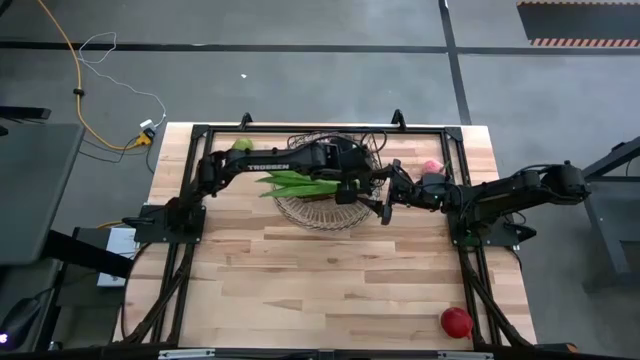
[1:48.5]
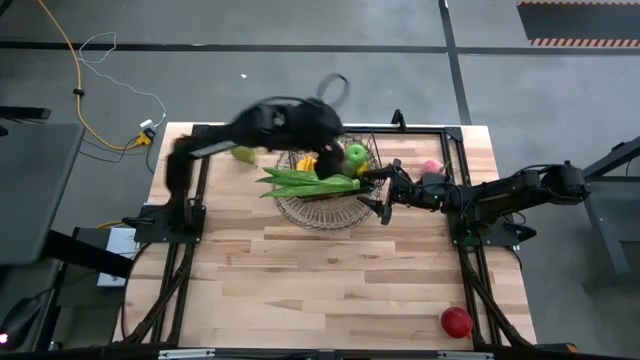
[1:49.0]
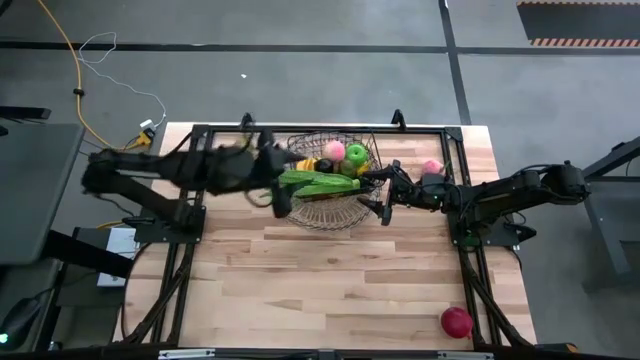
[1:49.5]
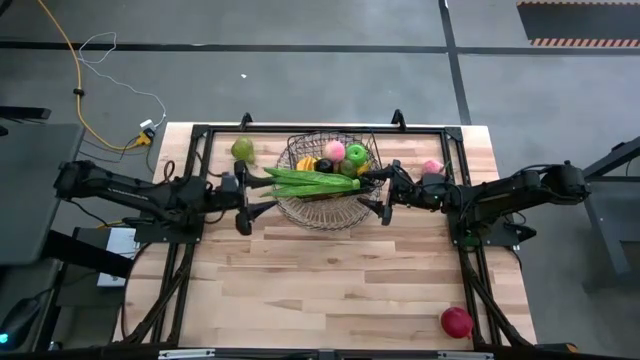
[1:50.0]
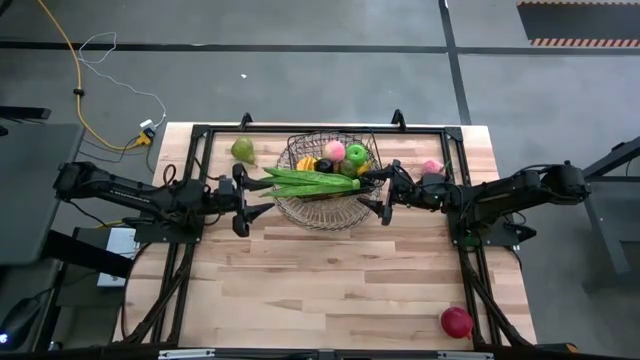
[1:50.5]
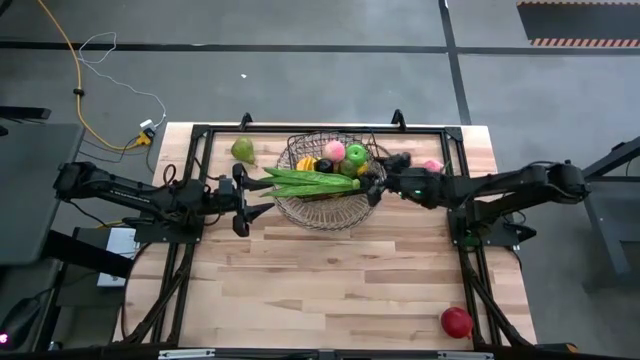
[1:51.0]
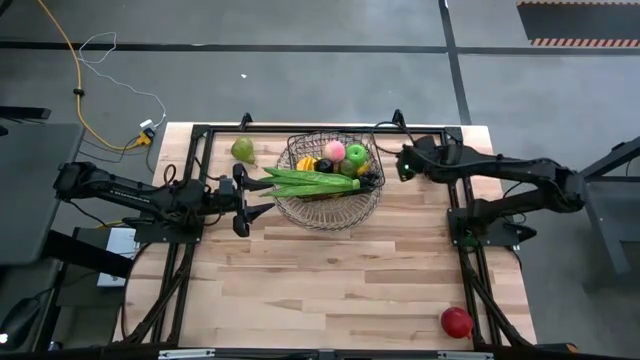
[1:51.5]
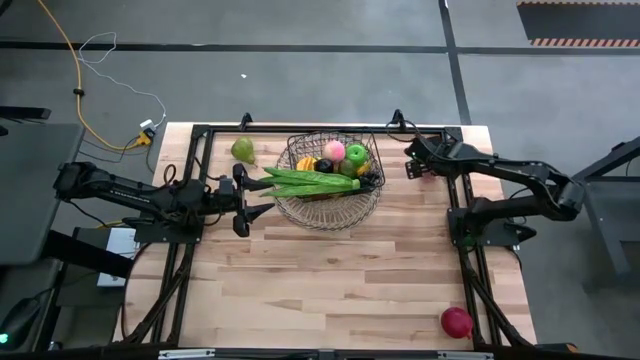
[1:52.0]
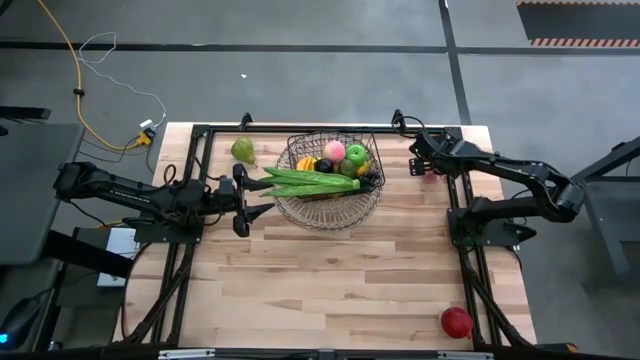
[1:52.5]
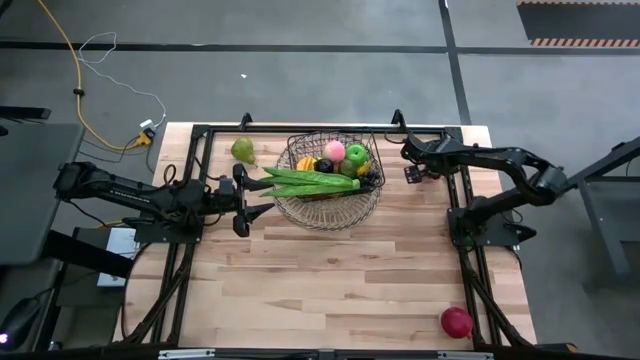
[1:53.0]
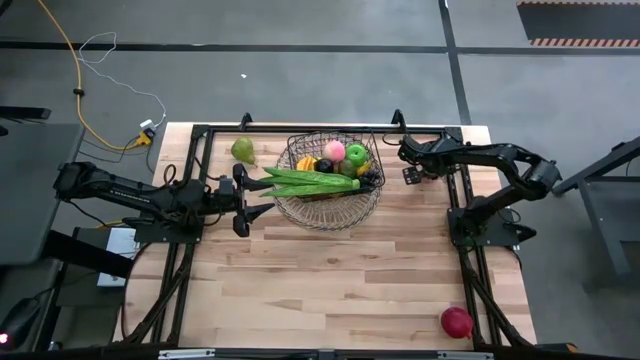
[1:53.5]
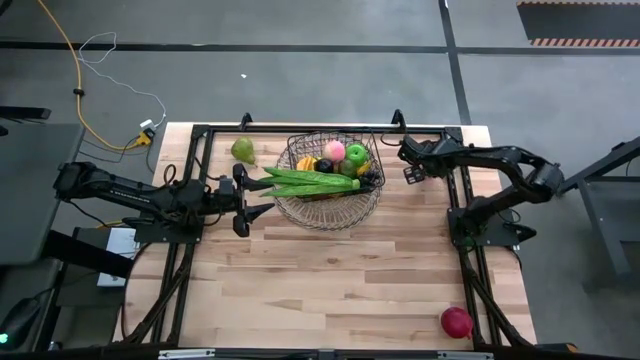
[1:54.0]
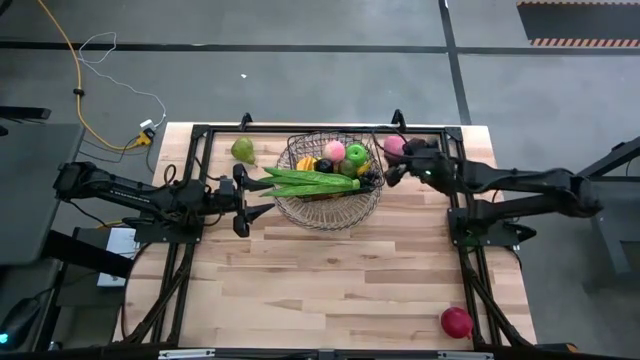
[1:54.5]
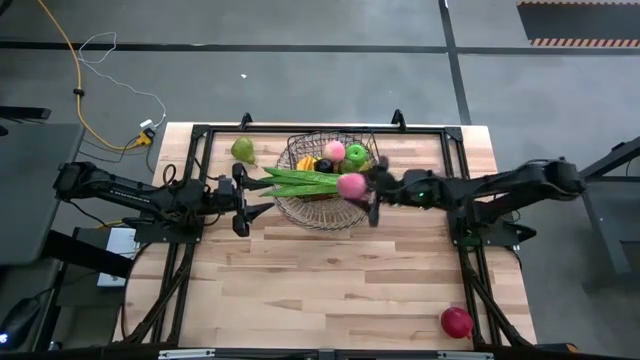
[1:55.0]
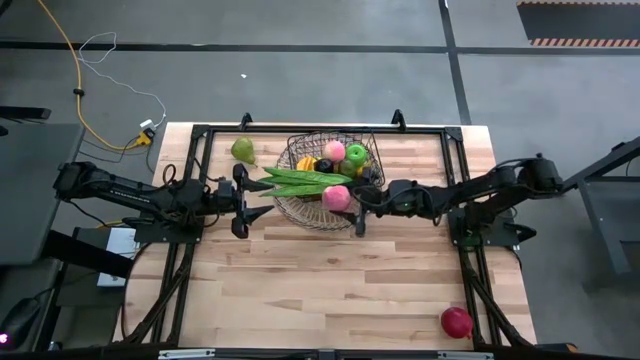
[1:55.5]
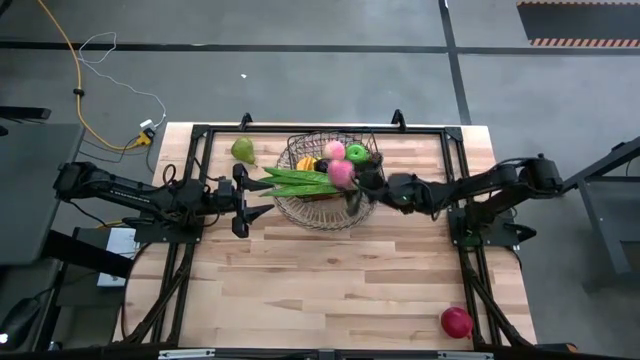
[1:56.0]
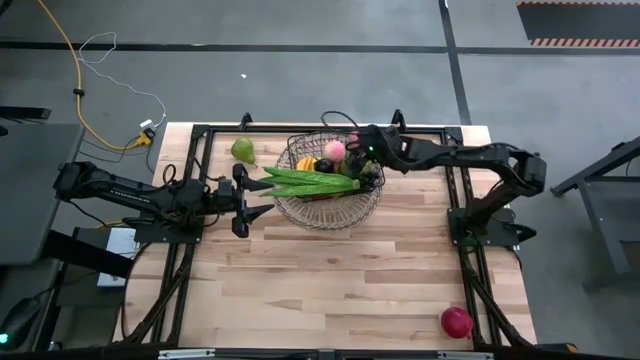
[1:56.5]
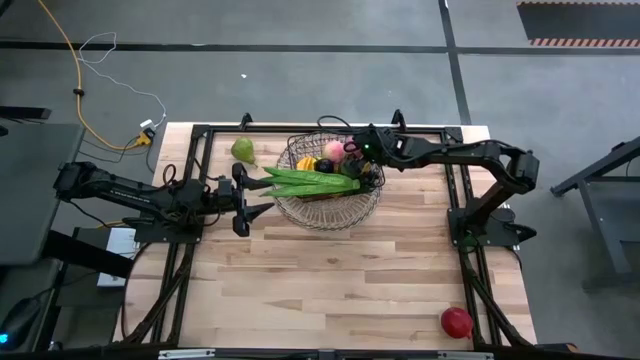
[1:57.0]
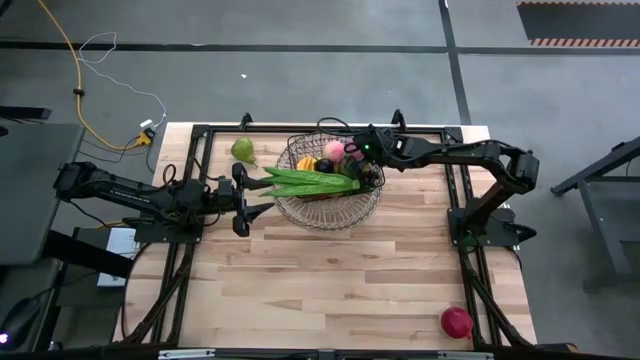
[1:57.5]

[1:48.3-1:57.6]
Task: Build produce basket
Put the peach into the wire basket

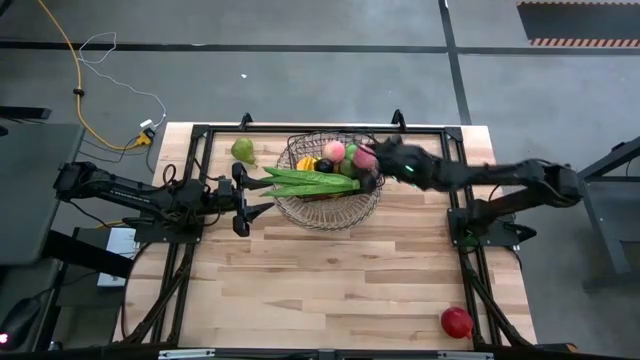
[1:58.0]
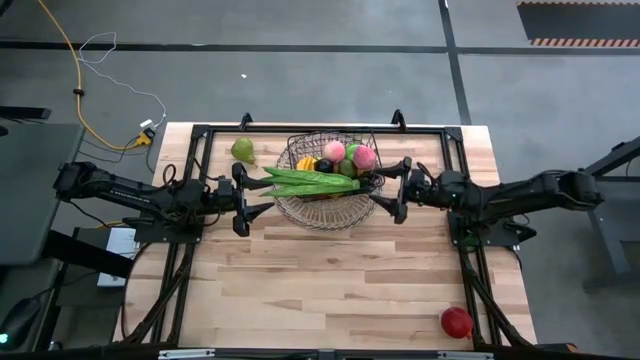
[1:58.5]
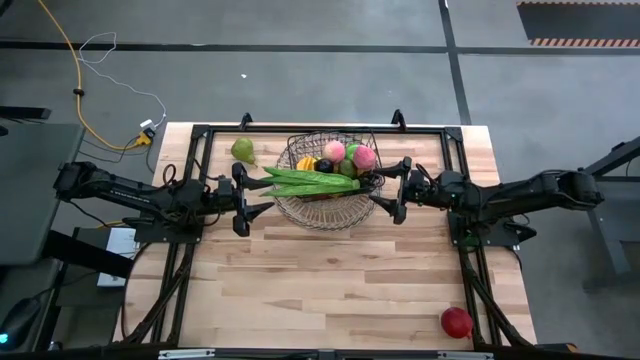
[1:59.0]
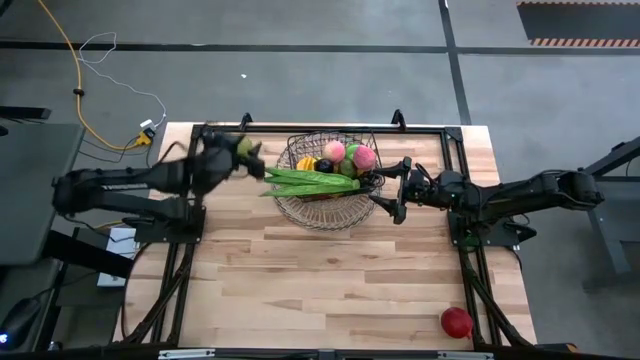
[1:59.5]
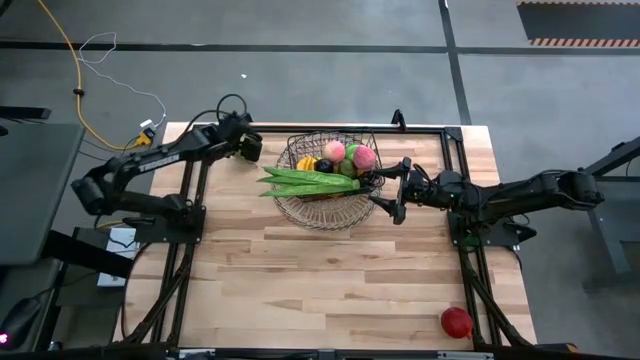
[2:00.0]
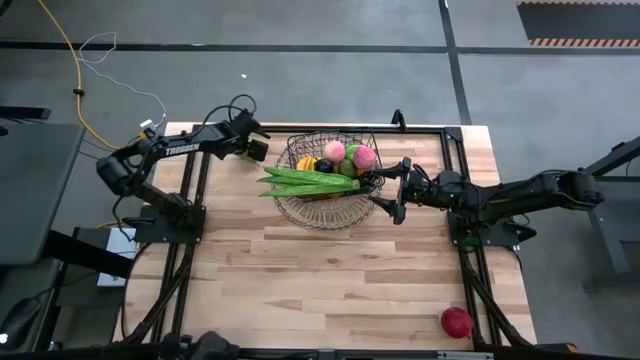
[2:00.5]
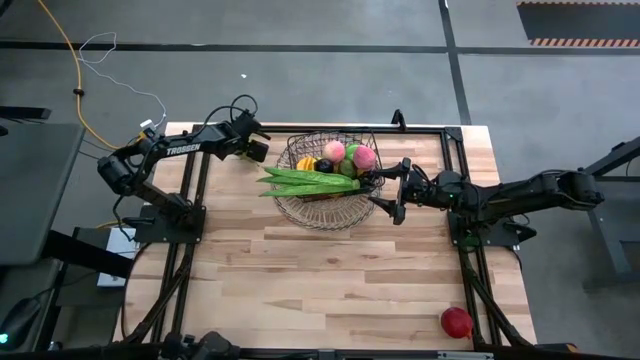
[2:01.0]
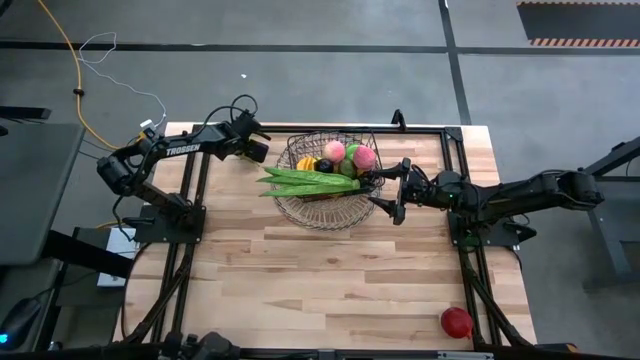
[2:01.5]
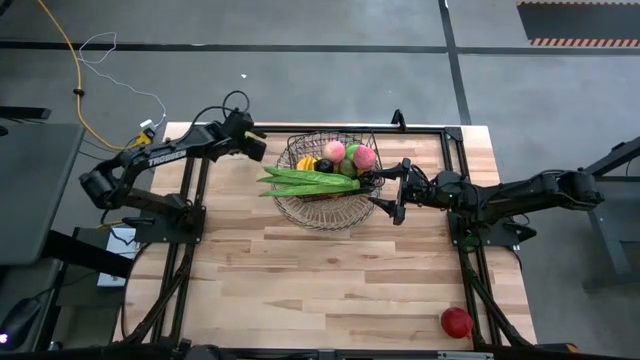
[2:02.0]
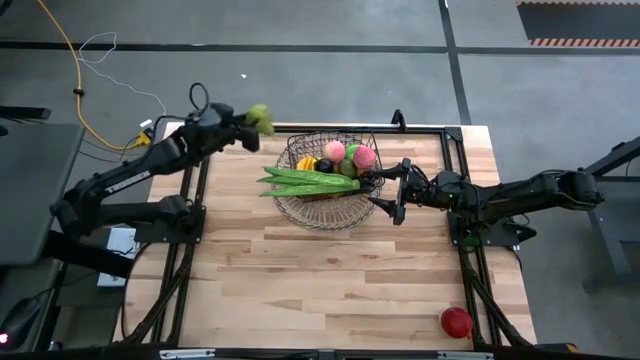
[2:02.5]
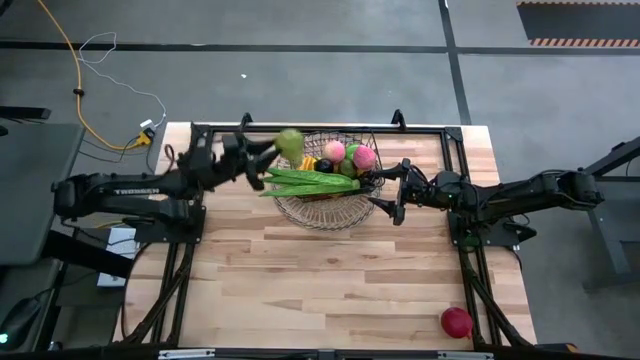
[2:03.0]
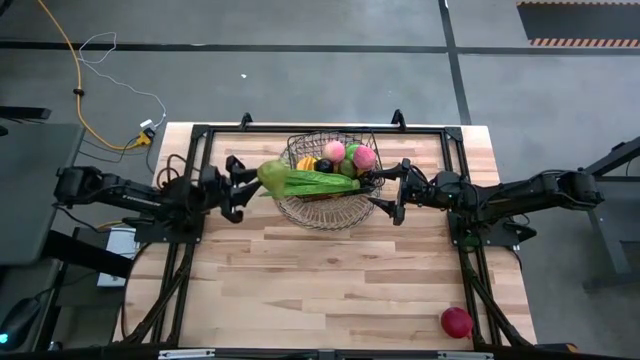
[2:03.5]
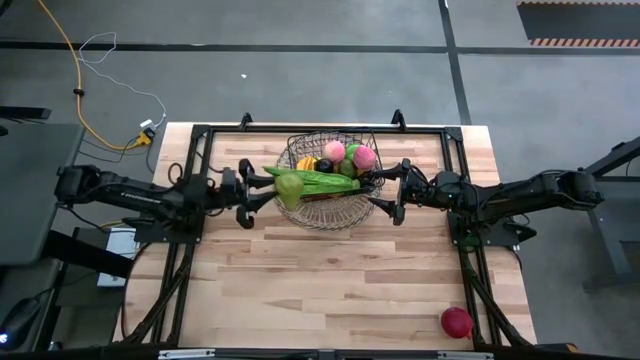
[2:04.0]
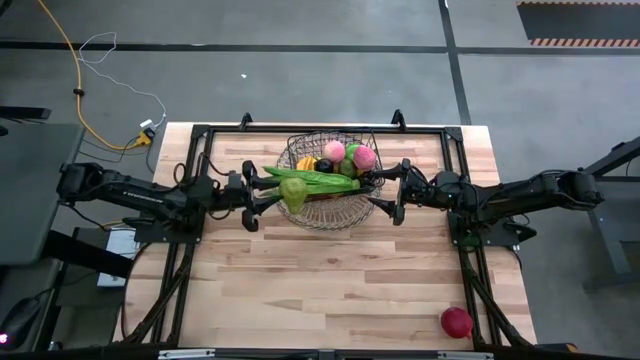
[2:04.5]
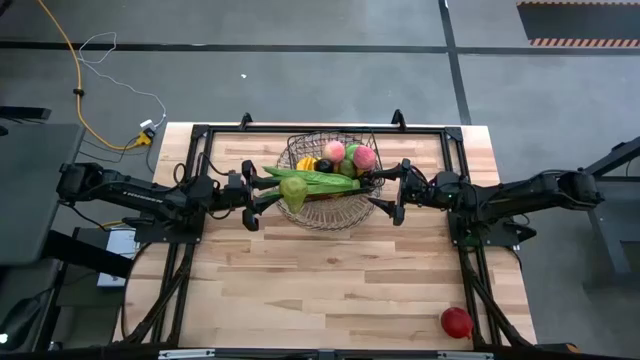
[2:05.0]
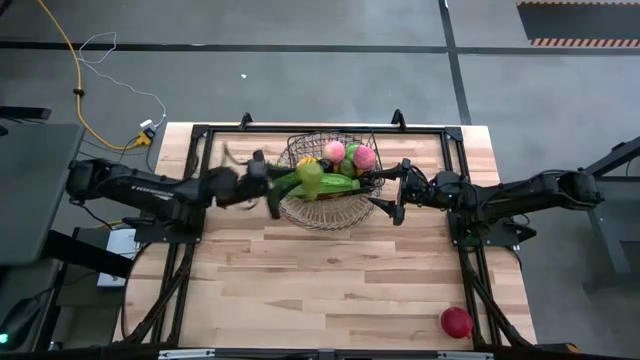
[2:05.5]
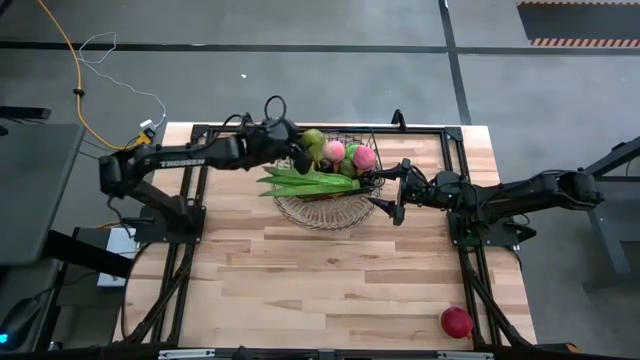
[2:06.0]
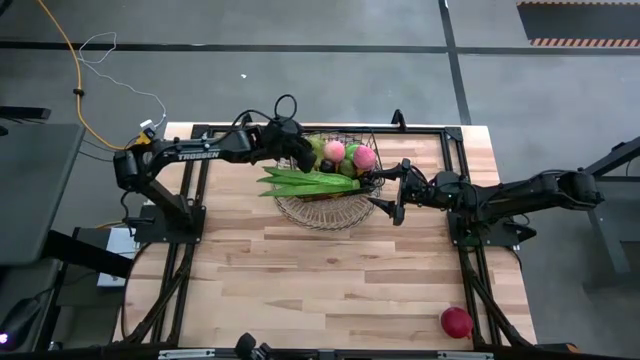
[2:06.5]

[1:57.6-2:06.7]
Put the pear into the wire basket

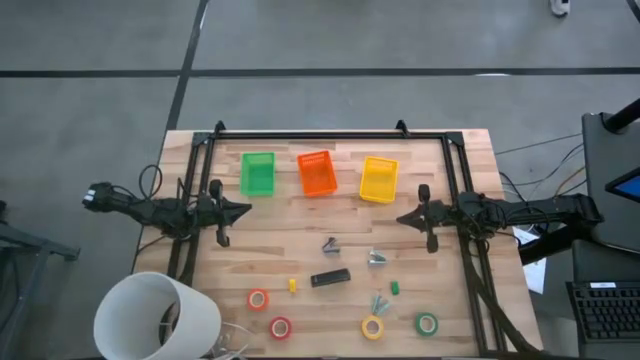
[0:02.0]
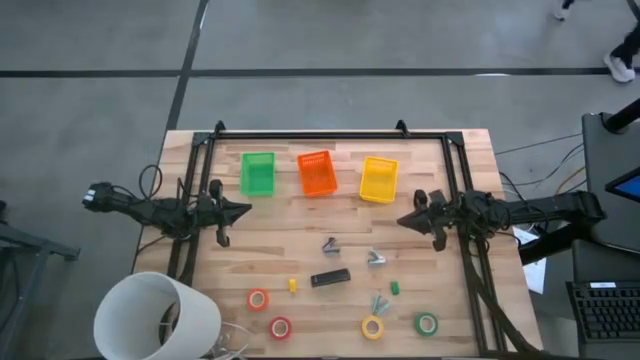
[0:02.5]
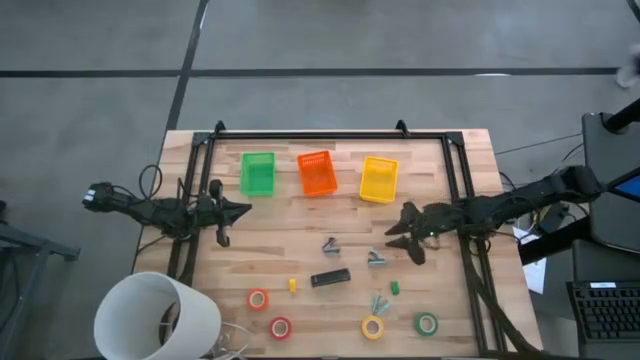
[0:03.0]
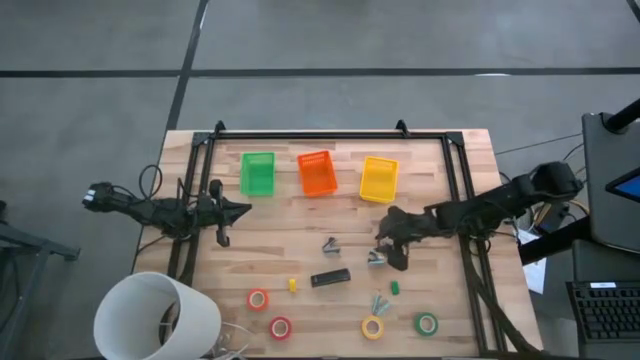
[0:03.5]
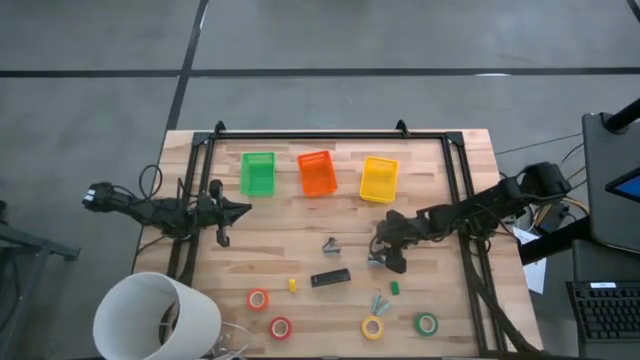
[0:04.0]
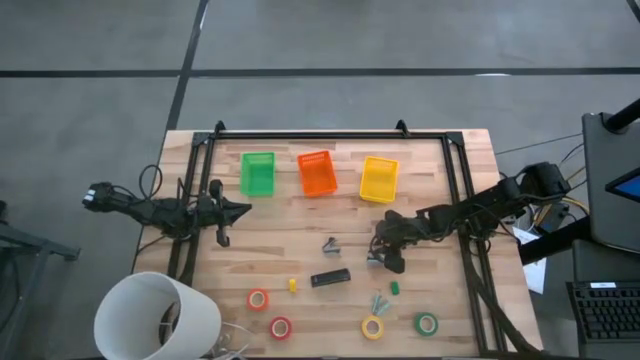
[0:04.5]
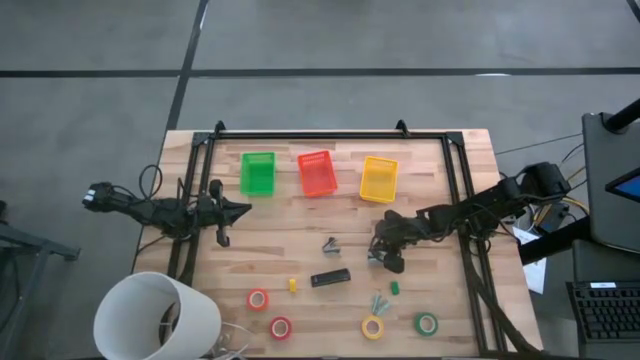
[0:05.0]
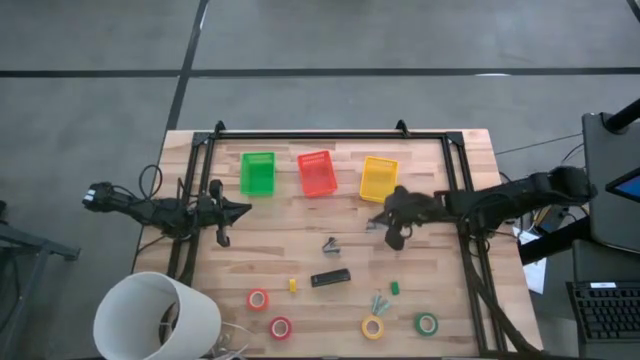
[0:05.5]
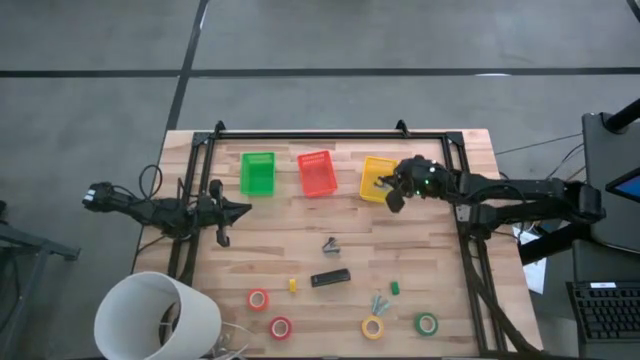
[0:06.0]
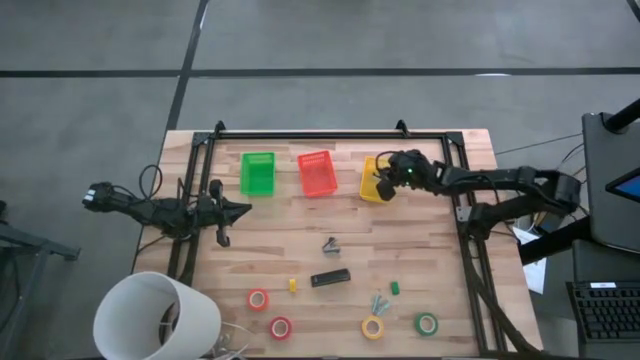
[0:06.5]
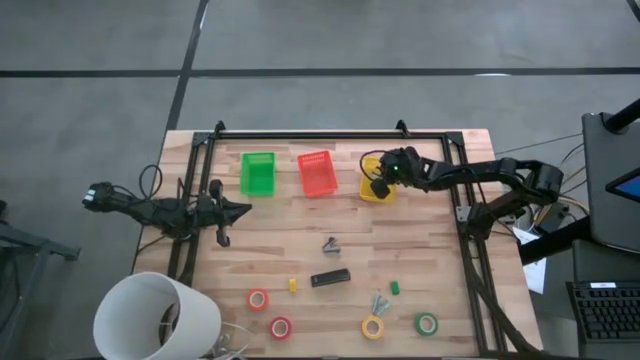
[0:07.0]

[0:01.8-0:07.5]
Task: Pick and place Stapler, Stapler remover, tape
Put the top light blue staple remover into the yellow bin
